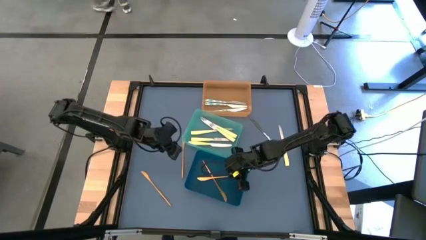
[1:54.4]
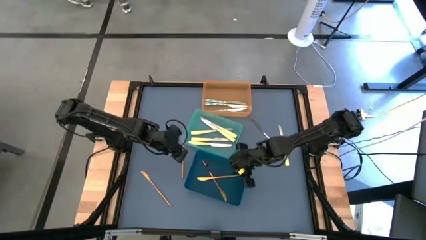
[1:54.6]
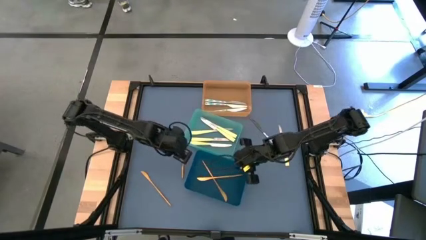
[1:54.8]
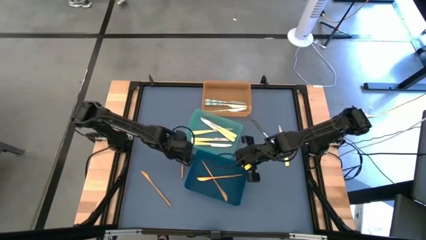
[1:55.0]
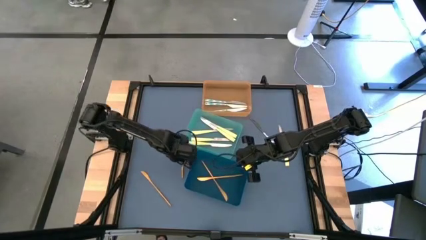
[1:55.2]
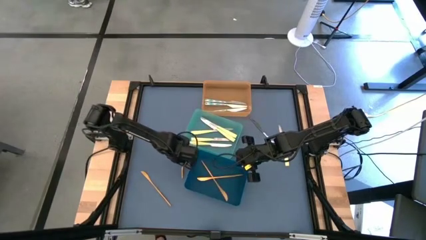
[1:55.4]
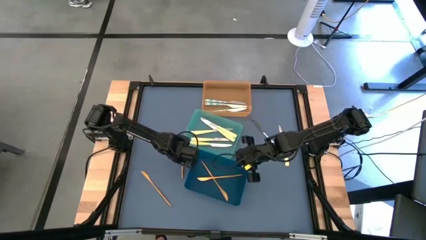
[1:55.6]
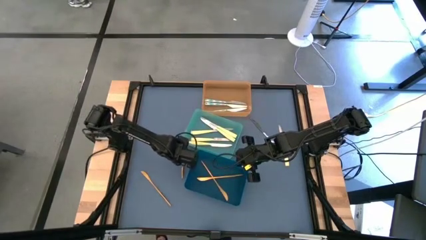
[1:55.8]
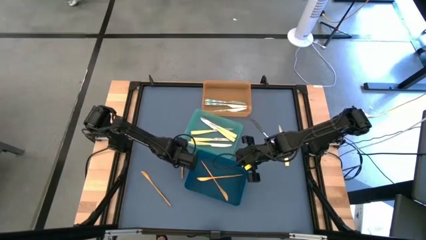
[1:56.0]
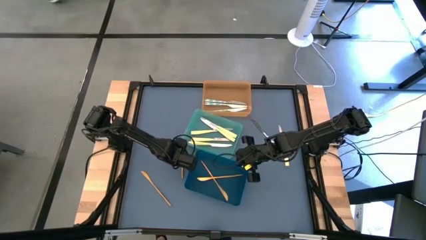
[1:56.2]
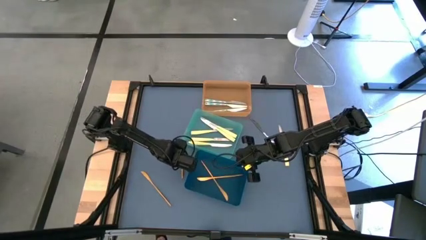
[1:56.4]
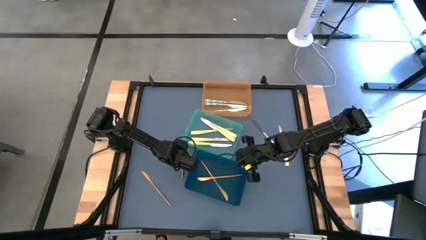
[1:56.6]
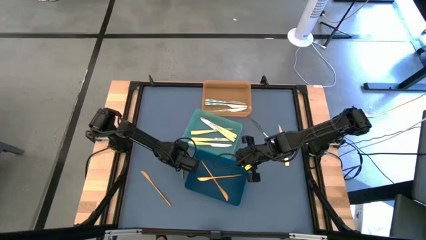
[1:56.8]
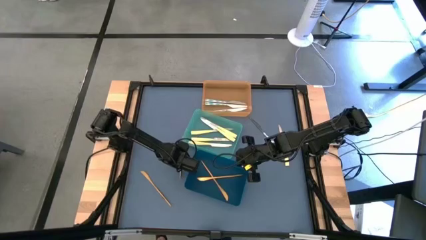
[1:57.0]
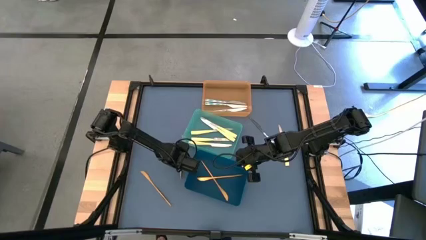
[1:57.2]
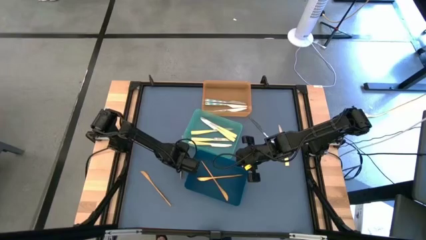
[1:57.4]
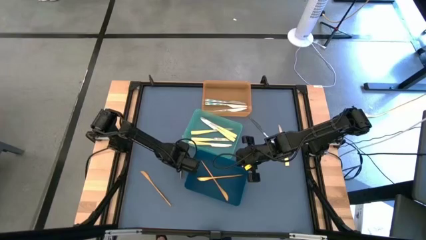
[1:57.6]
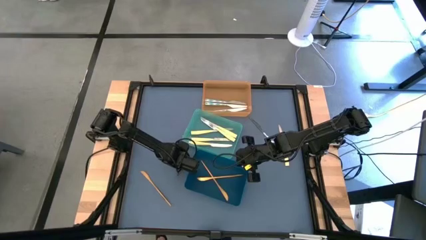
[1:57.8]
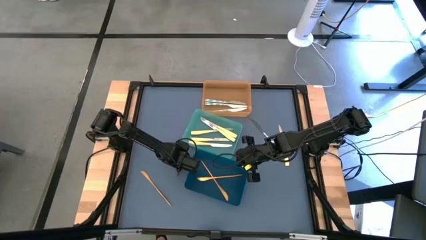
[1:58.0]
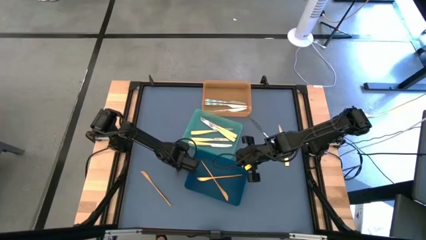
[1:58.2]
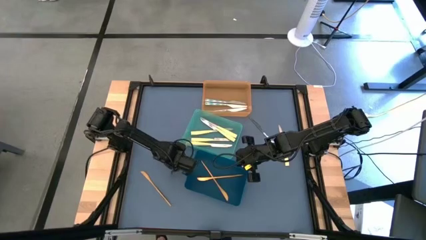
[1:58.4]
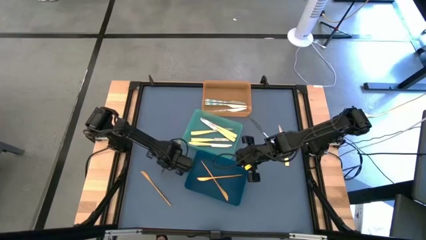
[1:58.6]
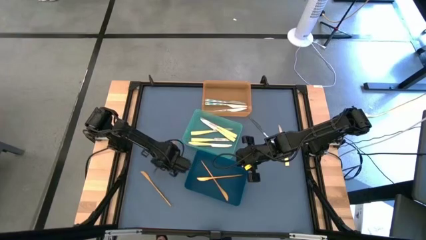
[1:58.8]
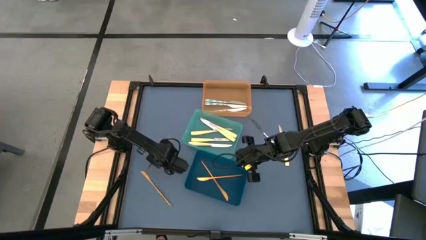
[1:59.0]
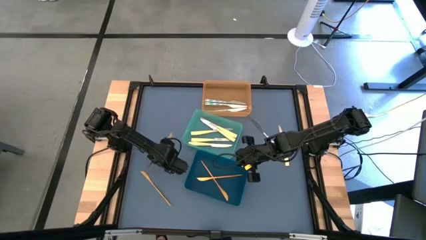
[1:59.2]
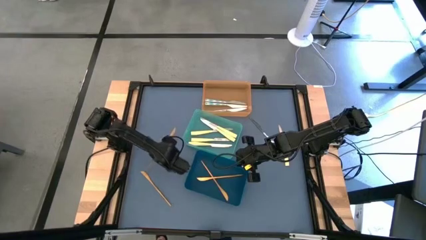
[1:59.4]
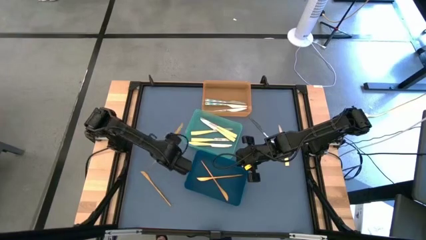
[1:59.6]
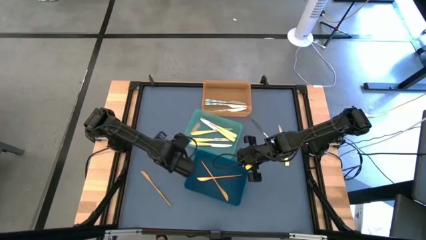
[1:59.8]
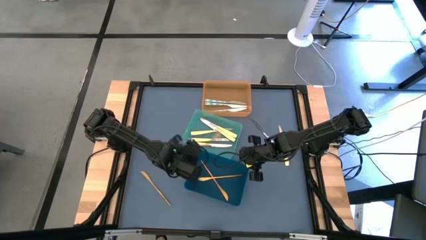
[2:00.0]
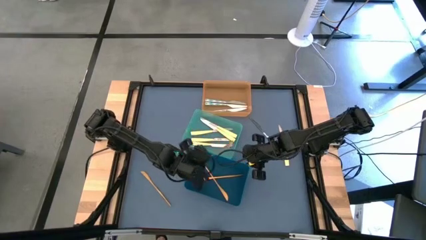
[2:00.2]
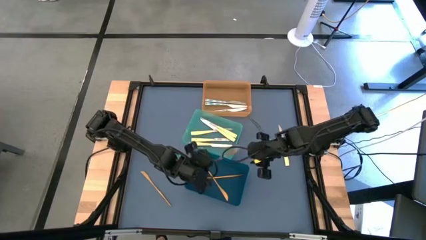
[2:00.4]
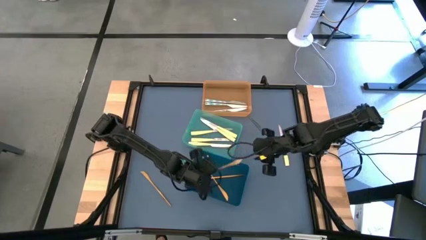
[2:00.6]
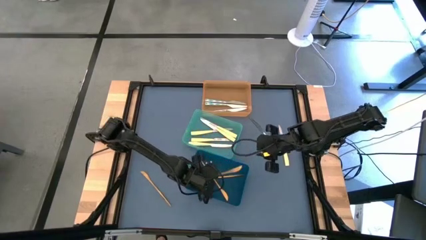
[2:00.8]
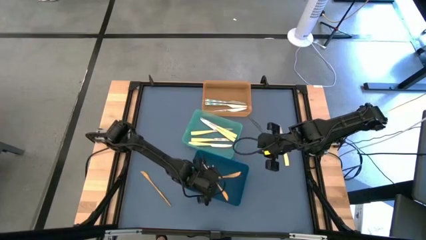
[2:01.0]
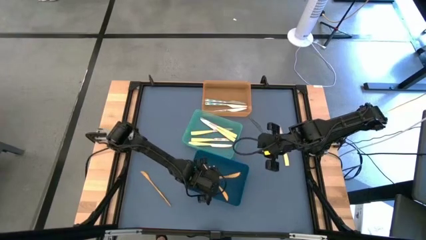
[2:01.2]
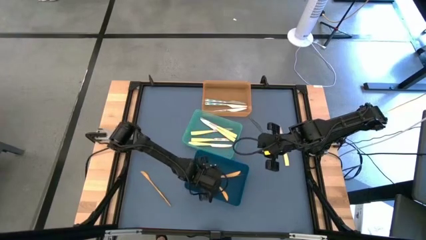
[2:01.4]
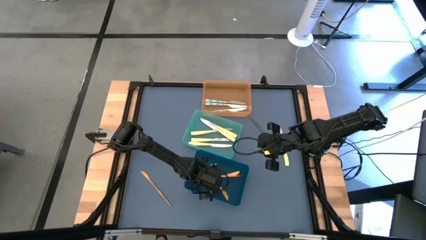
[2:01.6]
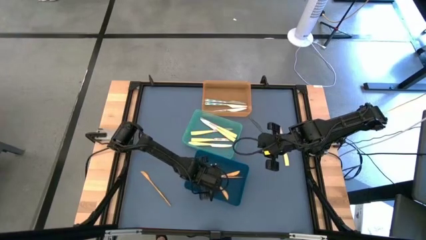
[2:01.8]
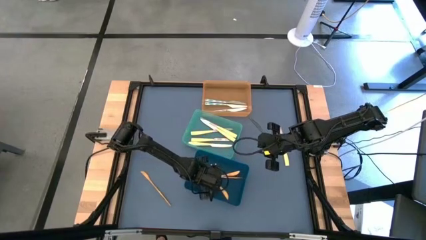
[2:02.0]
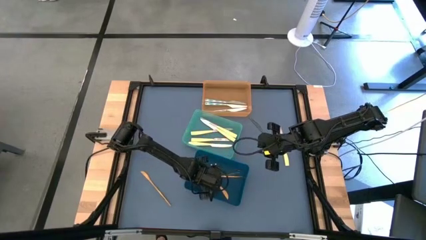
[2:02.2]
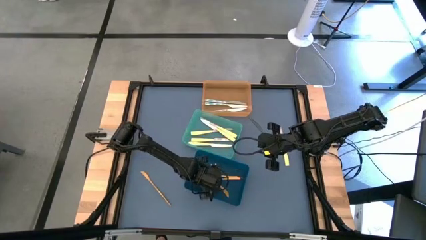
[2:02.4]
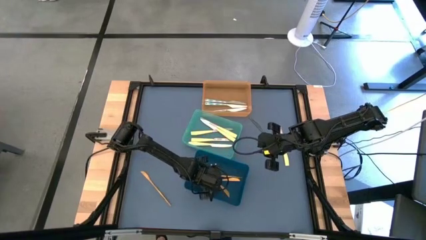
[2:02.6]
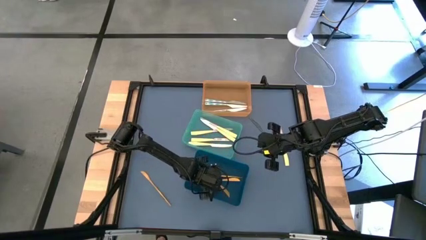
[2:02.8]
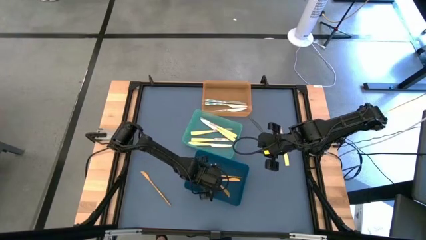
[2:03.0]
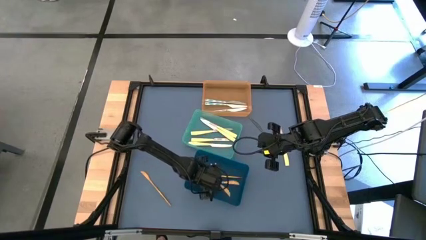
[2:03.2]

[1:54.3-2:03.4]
Task: Sort silverware by color (type)
Put the golden knife into the blue bin

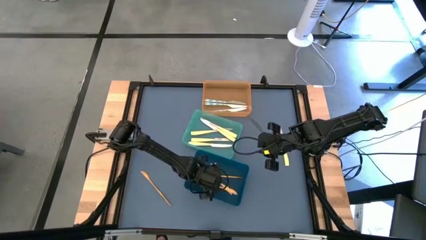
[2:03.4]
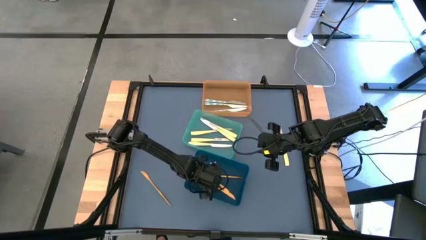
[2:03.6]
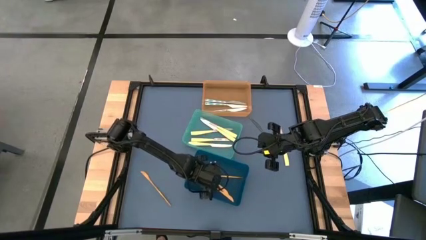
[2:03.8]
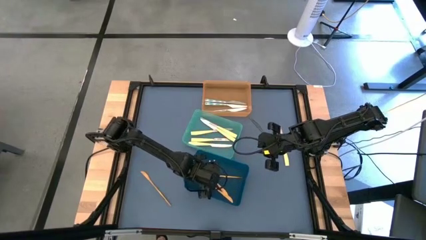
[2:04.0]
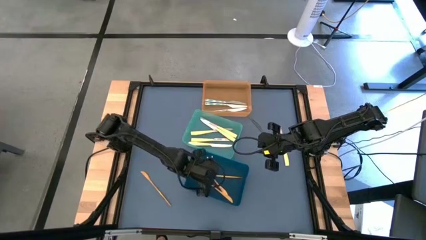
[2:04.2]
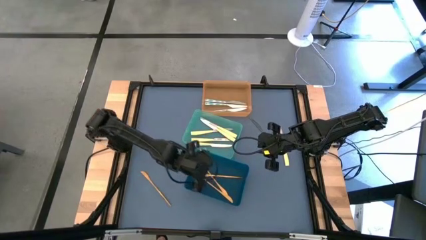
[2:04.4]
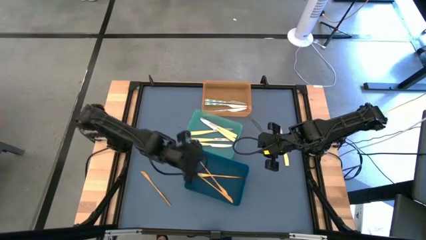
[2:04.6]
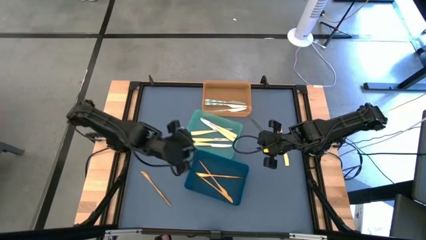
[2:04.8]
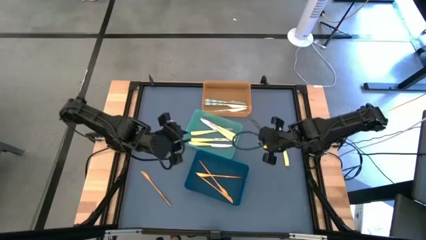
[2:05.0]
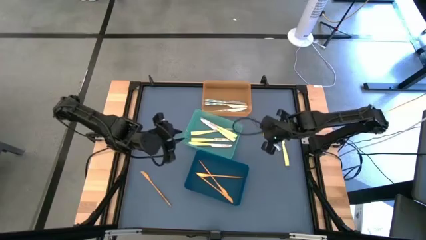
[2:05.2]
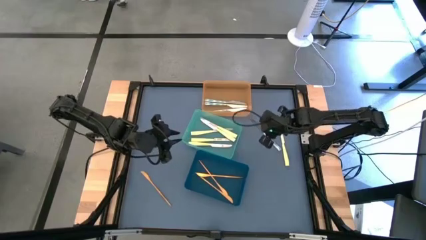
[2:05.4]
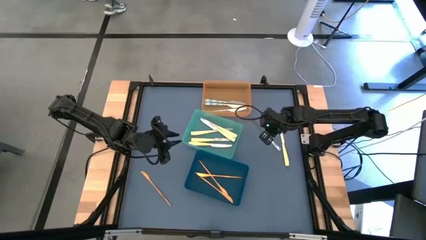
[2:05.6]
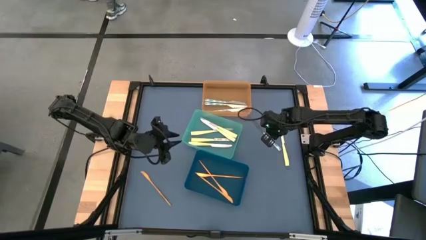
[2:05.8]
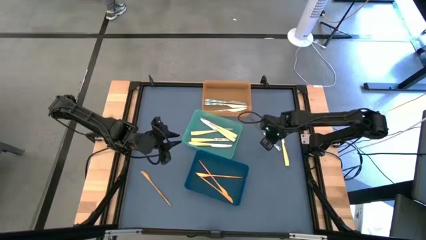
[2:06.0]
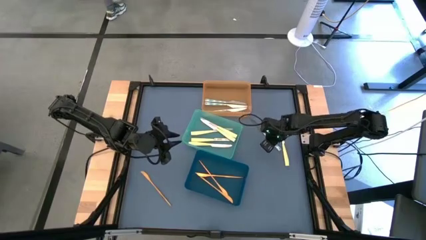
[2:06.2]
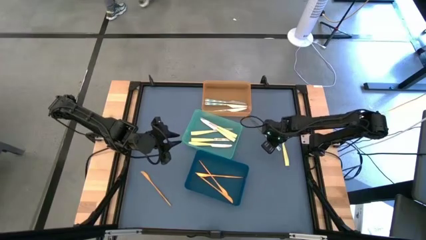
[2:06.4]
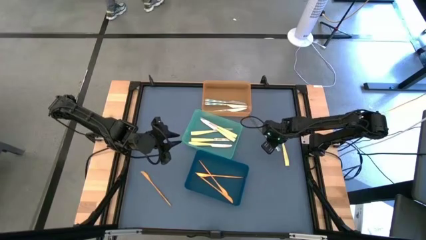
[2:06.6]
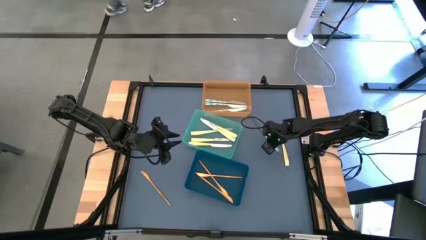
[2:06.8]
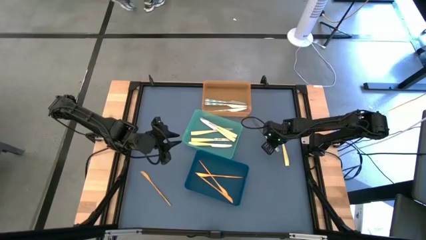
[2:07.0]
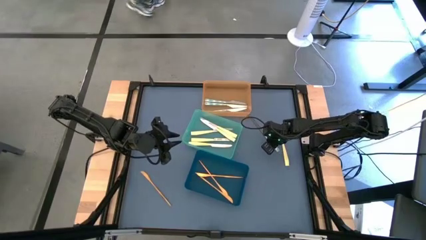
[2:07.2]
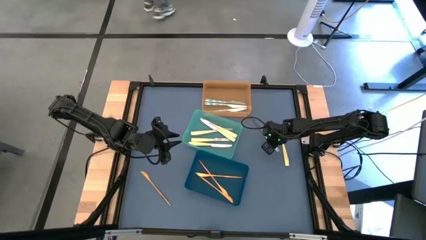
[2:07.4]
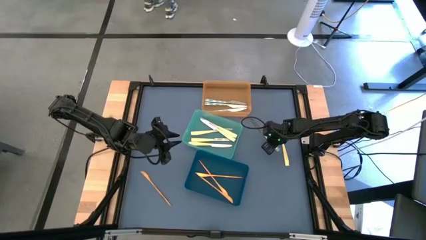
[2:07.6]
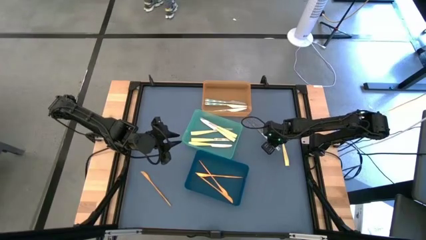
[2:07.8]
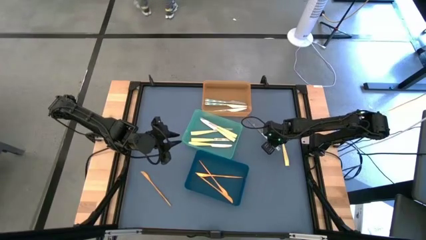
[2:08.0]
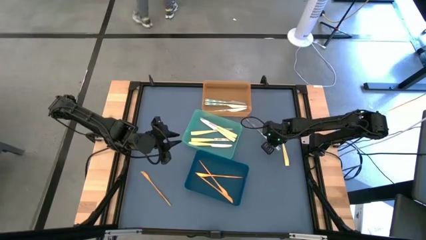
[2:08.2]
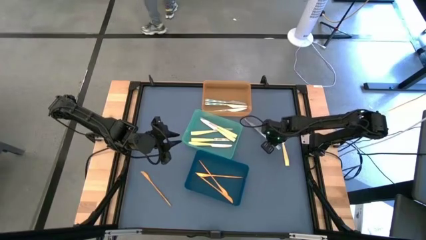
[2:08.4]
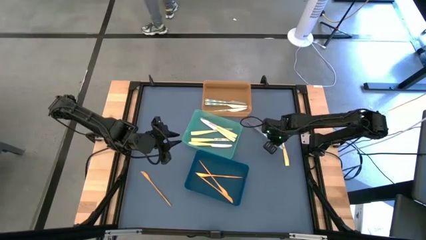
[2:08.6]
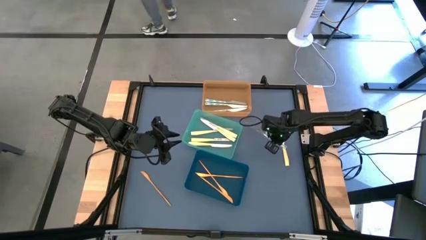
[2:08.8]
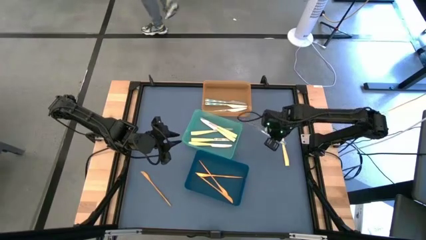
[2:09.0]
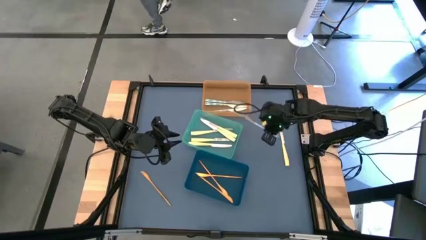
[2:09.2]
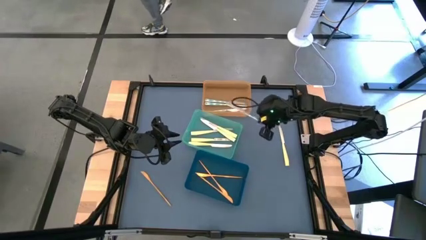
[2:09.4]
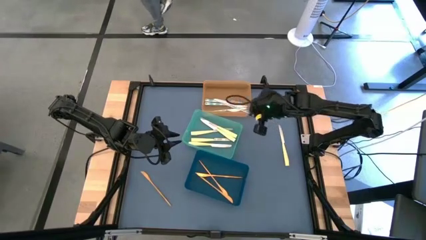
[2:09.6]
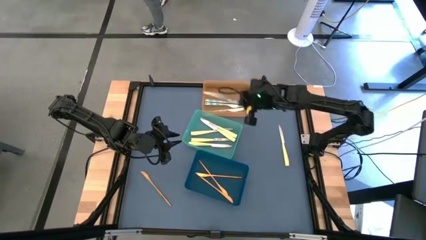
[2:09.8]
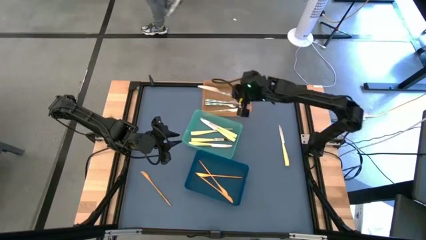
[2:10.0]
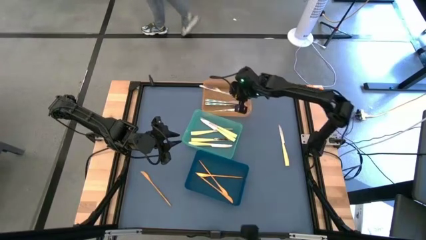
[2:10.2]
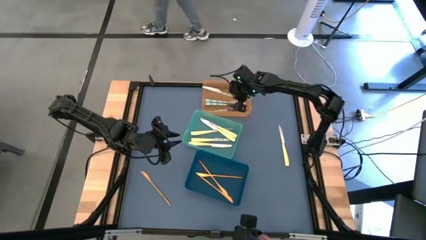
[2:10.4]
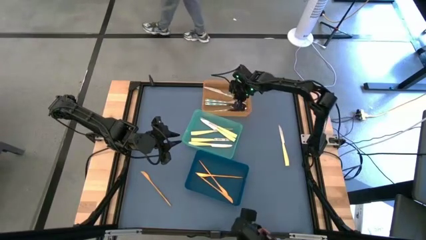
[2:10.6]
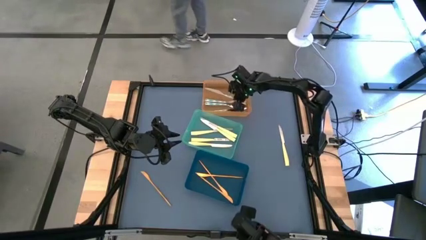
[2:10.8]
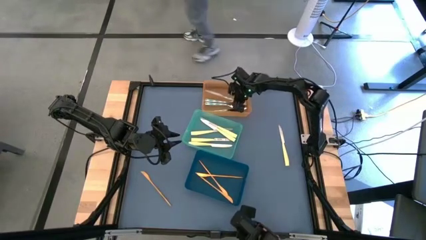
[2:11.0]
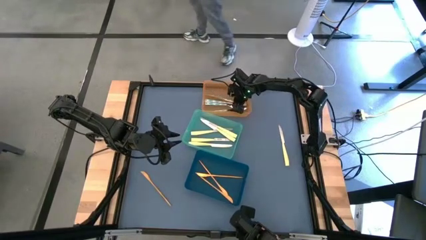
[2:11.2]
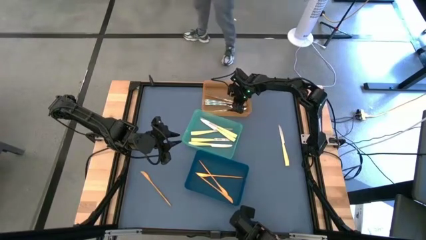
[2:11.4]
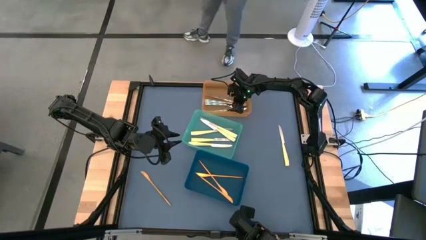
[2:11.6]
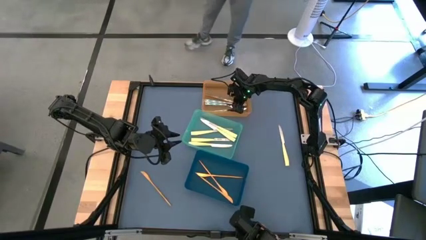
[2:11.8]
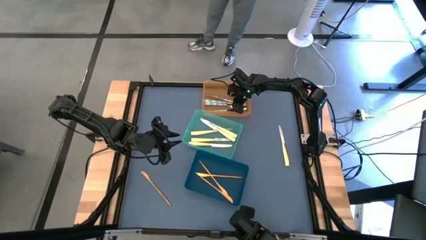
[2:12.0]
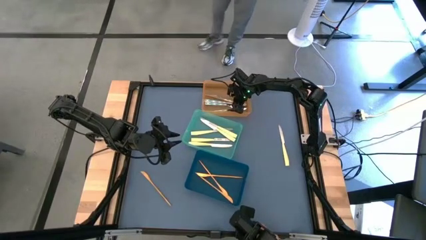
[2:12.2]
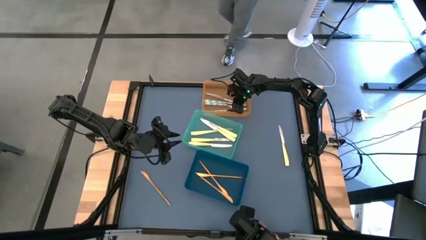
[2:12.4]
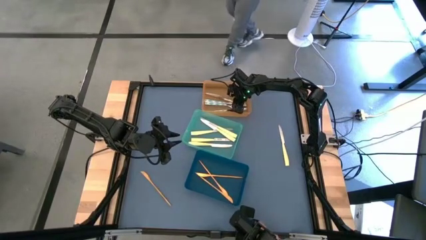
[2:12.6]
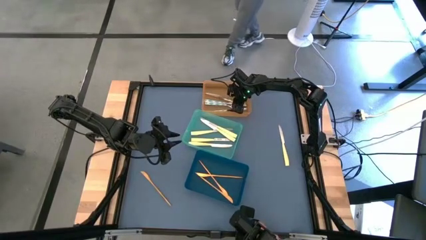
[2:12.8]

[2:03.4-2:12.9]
Put the white and blue knife into the orange bin
